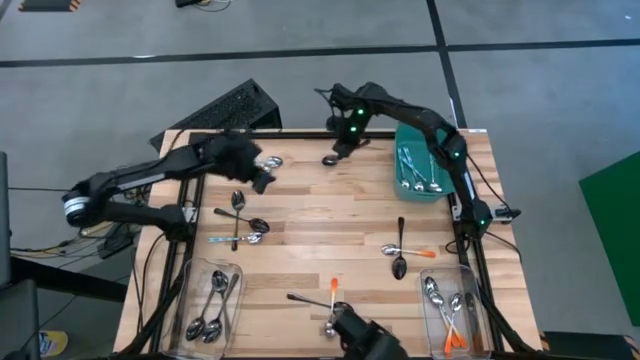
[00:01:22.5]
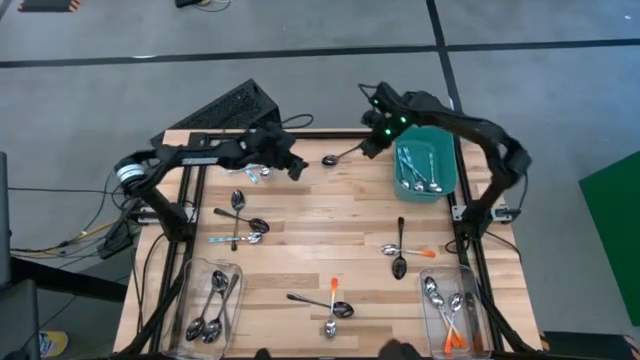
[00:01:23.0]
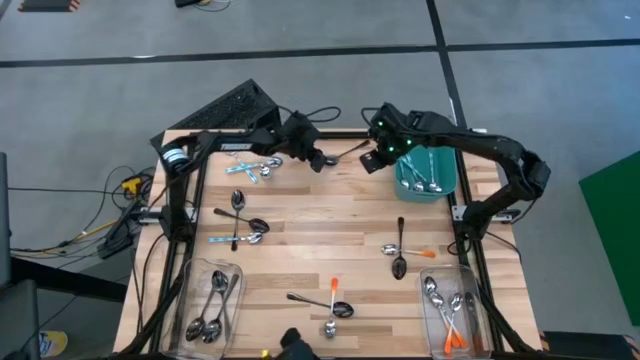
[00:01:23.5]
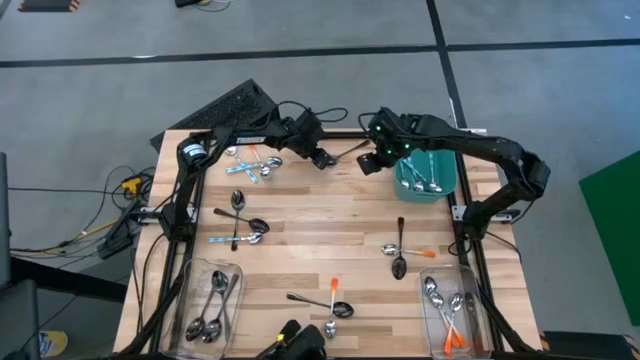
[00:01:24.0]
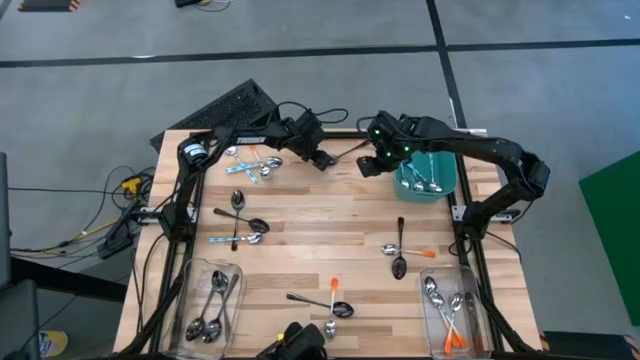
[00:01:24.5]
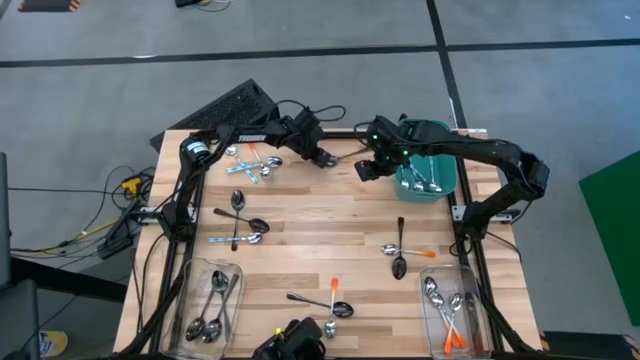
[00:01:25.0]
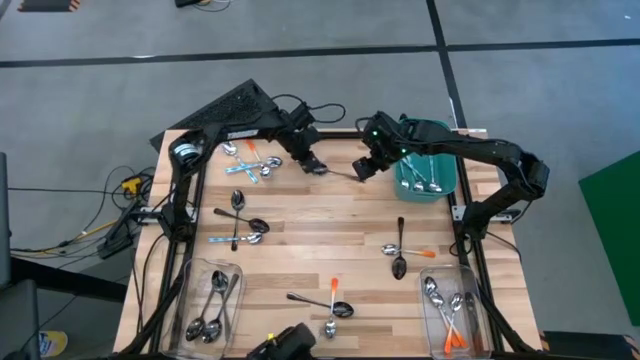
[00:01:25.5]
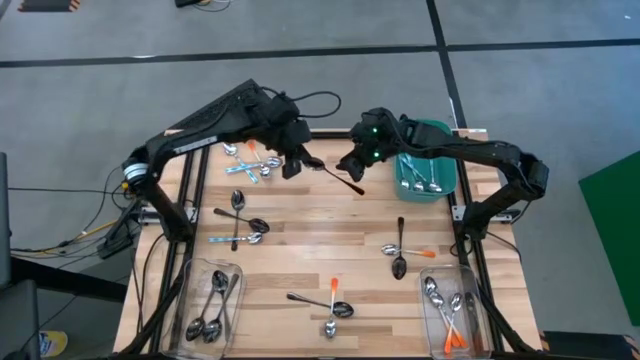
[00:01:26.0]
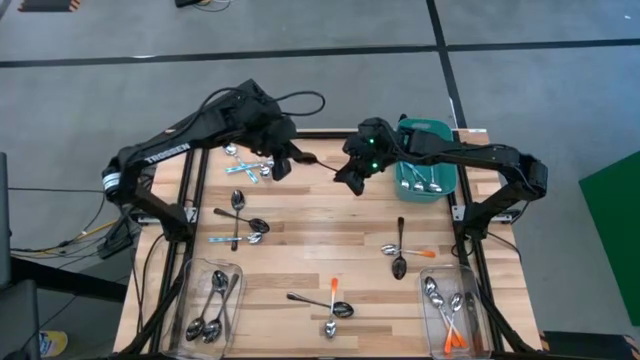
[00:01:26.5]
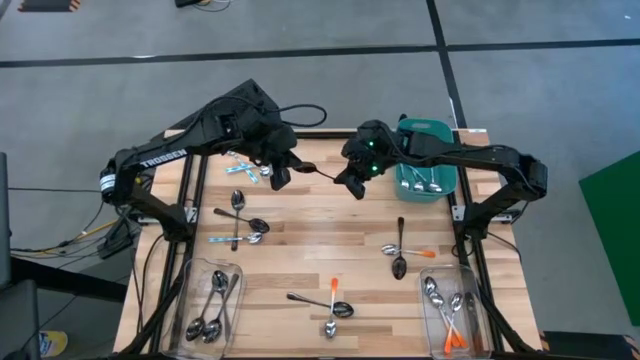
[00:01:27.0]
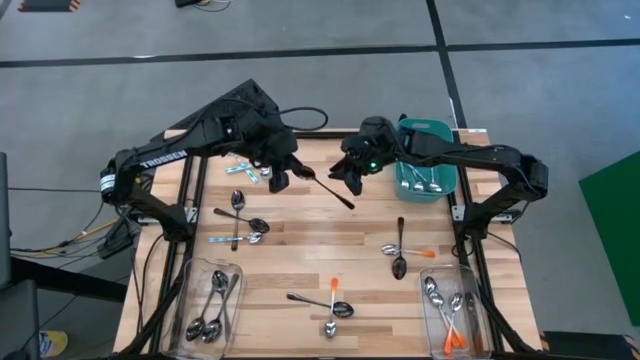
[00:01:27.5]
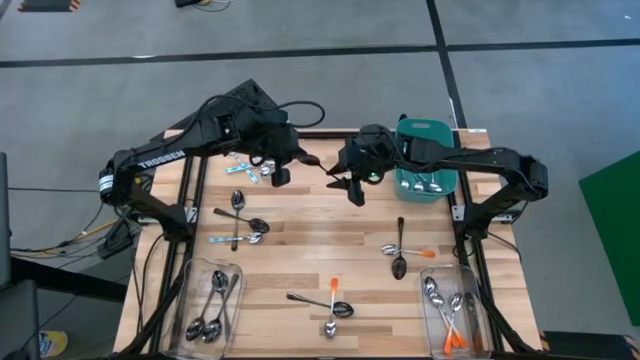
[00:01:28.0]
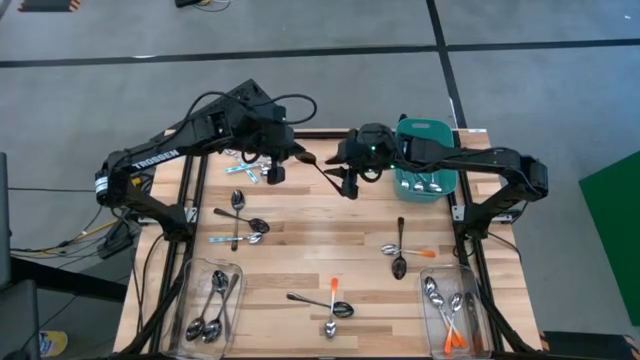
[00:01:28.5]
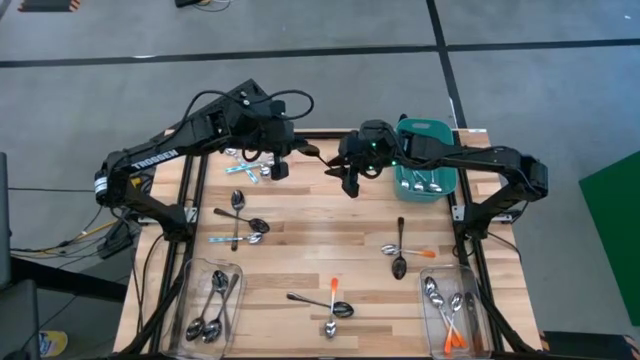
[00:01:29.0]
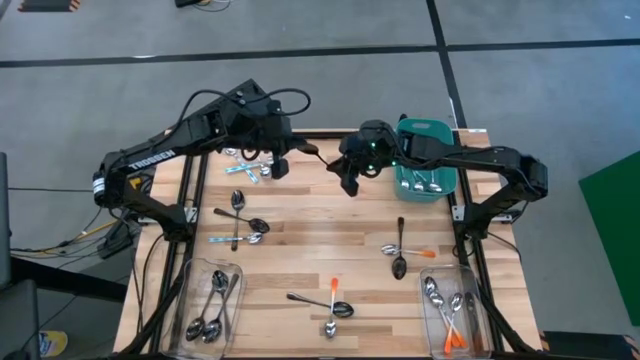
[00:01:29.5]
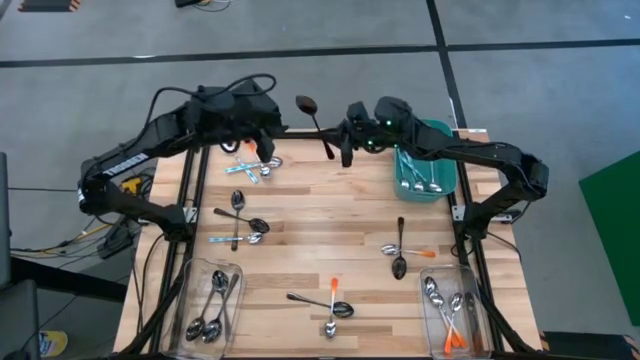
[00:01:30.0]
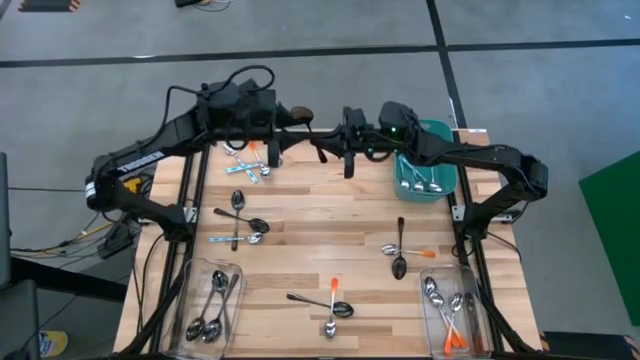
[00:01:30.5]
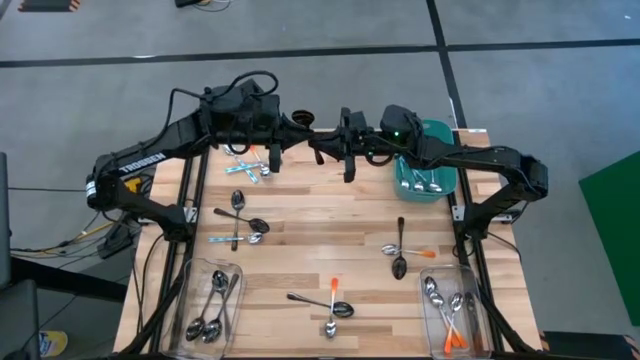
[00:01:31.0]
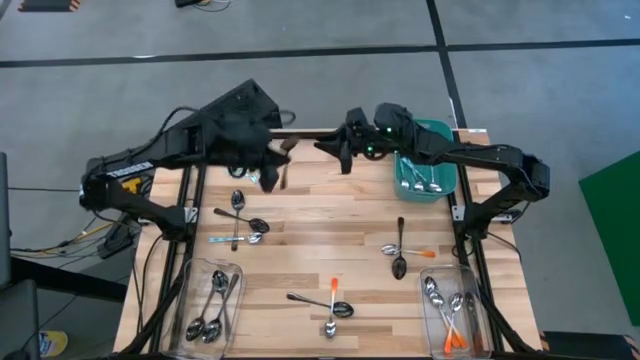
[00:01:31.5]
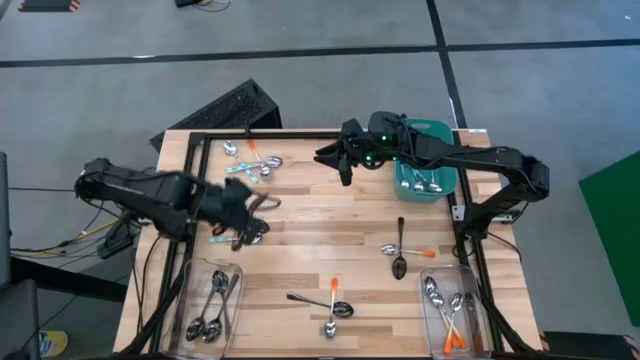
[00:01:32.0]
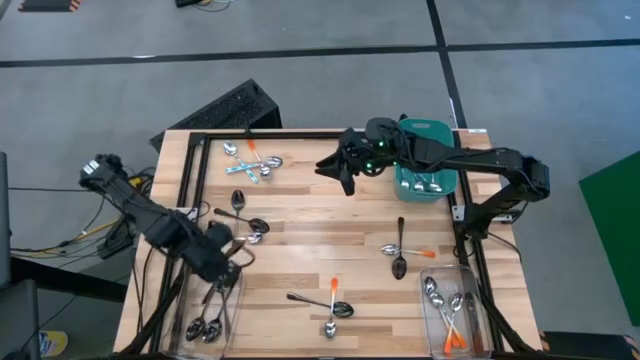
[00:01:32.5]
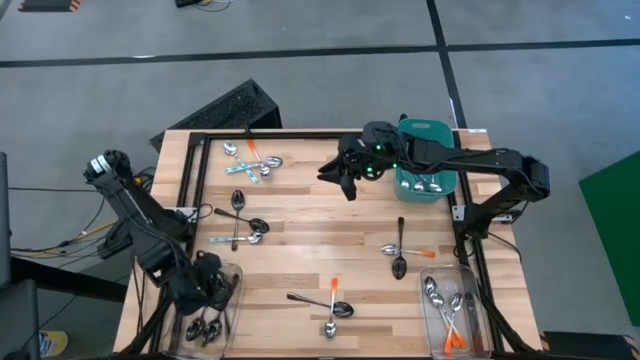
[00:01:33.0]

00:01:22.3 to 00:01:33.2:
Task: Sort silverware by color (type)
Put the black spoon into the left transparent bin

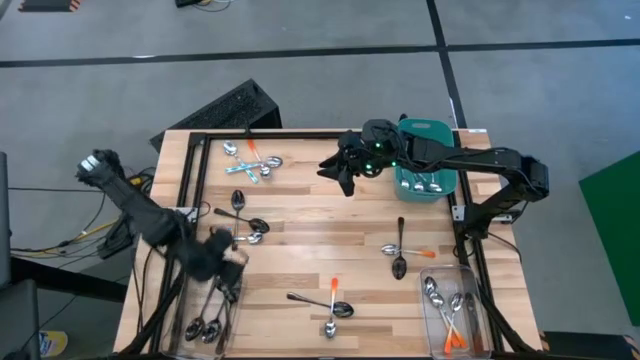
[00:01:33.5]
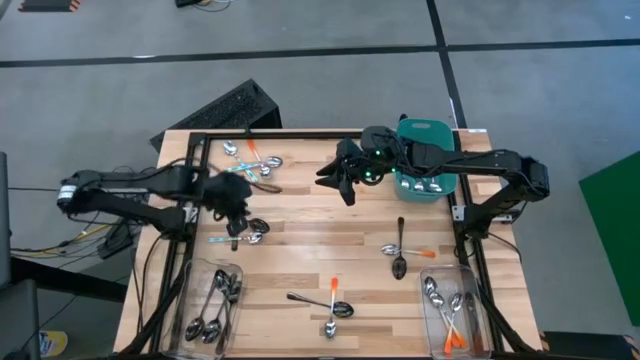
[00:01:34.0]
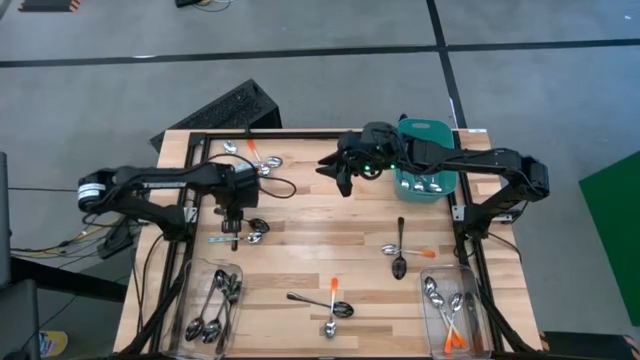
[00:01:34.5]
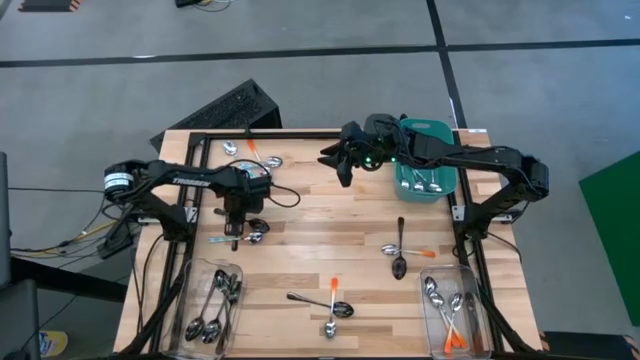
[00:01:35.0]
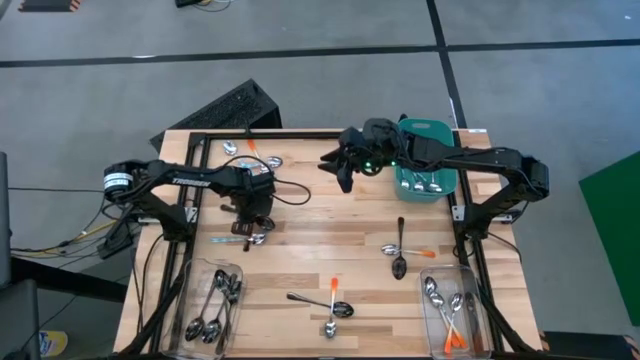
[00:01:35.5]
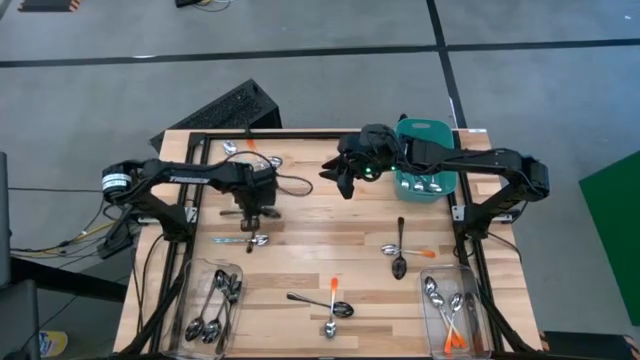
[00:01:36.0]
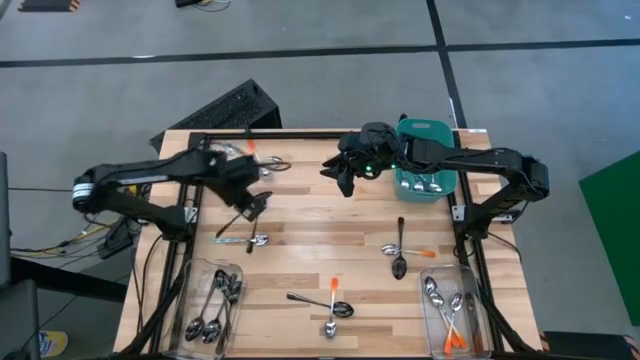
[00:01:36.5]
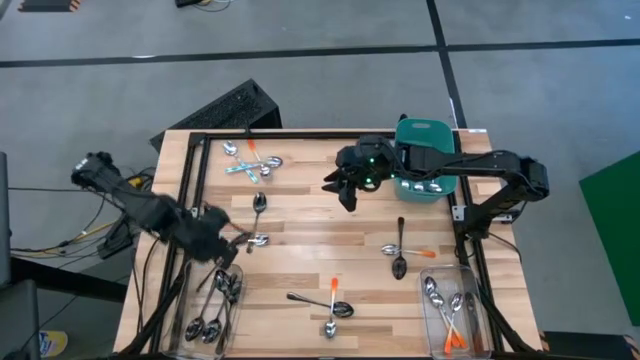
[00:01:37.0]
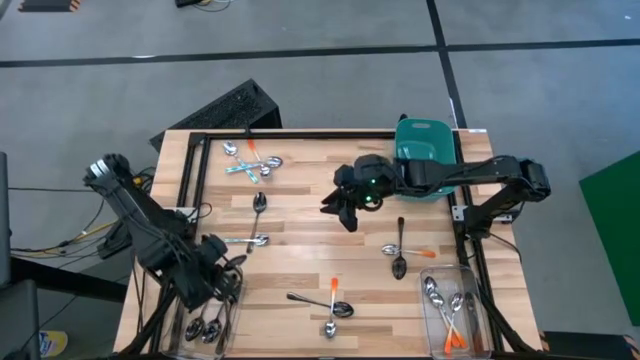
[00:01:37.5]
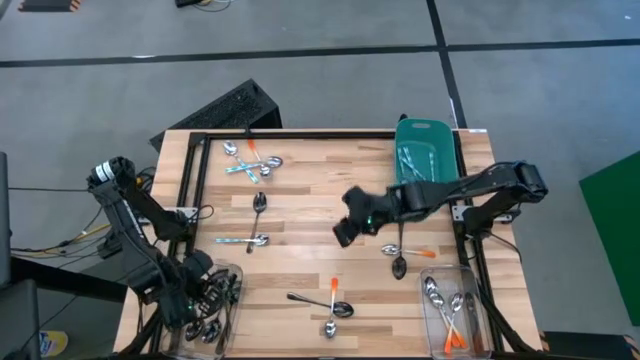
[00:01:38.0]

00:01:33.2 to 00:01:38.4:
Put the black spoon into the left transparent bin

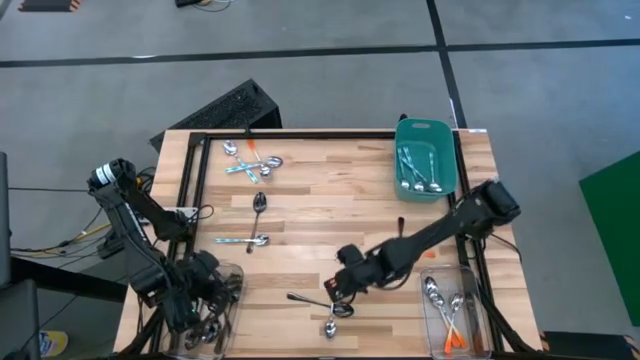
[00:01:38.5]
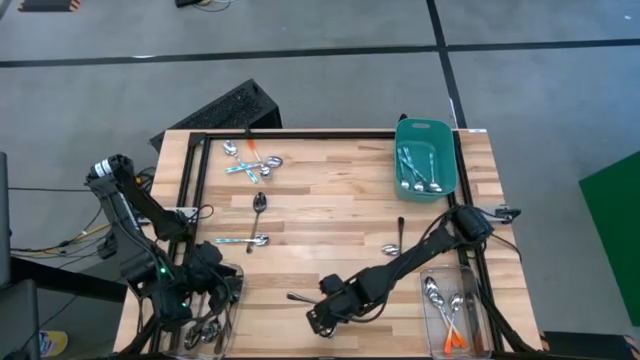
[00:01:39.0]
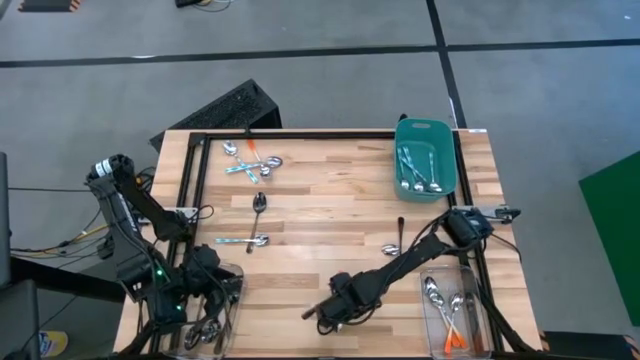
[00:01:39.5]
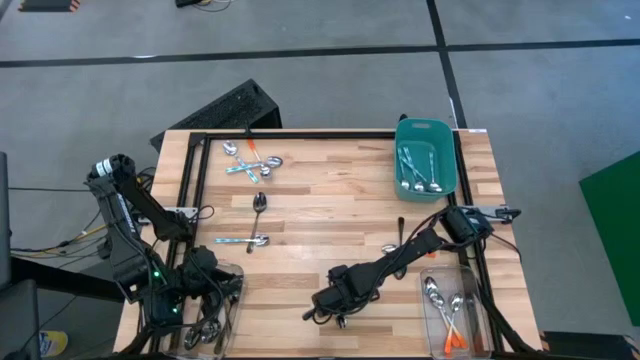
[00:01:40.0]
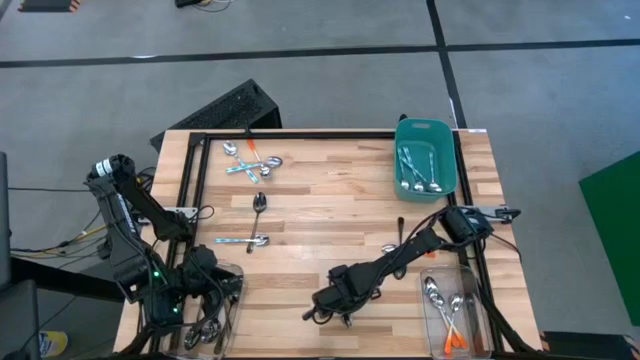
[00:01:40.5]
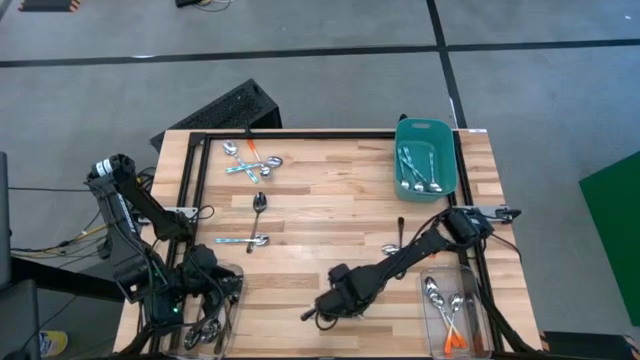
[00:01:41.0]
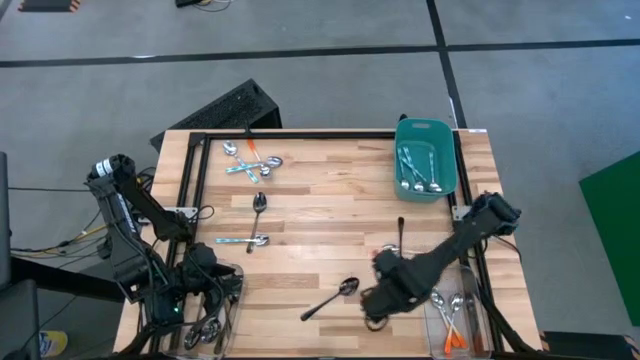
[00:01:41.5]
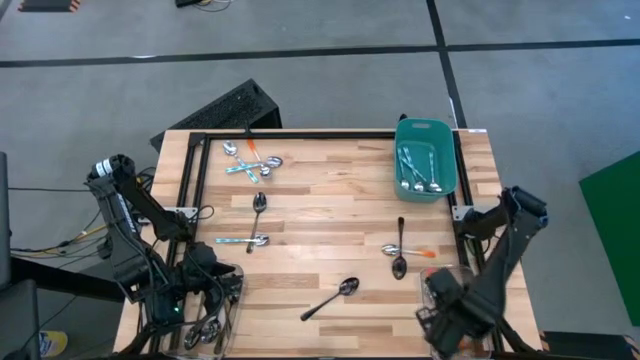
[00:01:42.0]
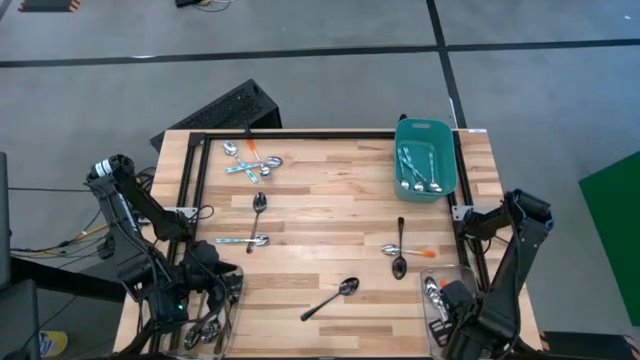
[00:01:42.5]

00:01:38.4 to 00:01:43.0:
Put the orange spoon into the right transparent bin
